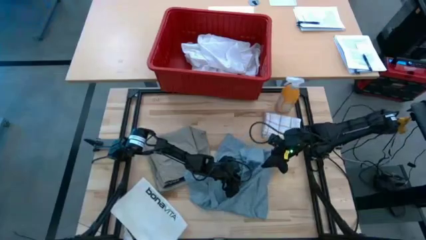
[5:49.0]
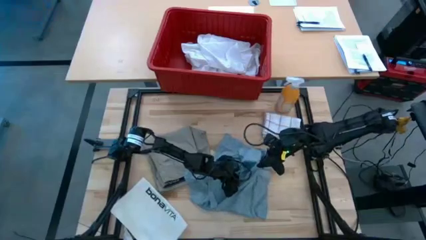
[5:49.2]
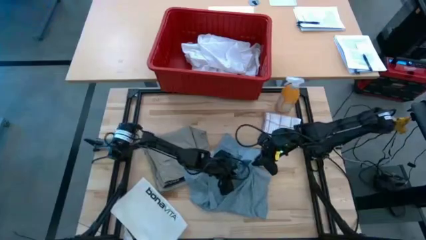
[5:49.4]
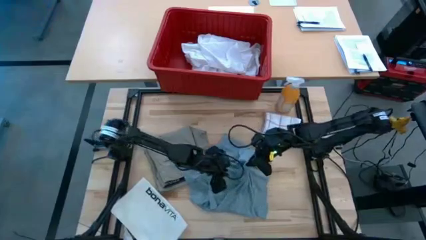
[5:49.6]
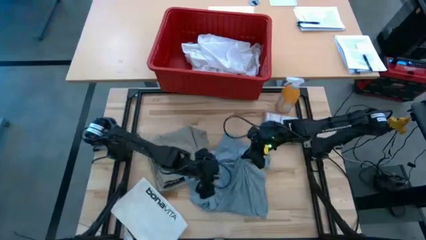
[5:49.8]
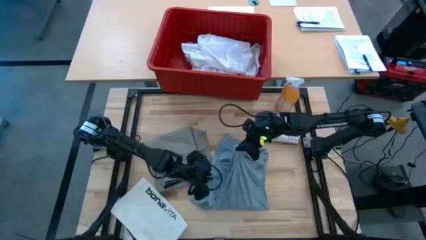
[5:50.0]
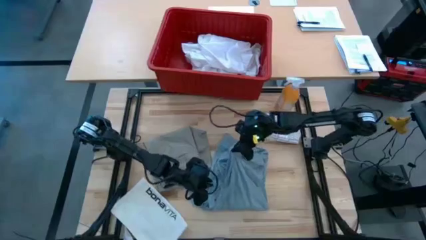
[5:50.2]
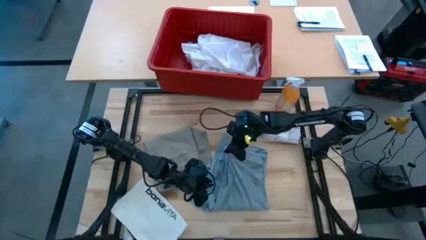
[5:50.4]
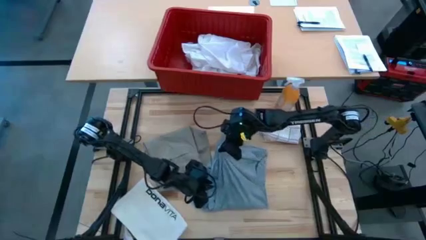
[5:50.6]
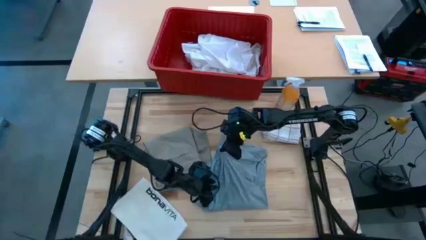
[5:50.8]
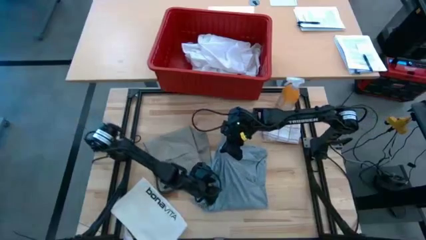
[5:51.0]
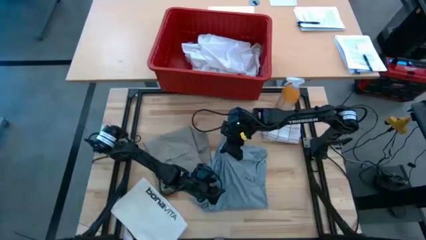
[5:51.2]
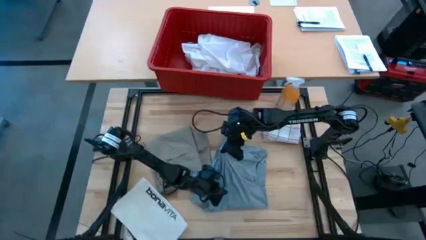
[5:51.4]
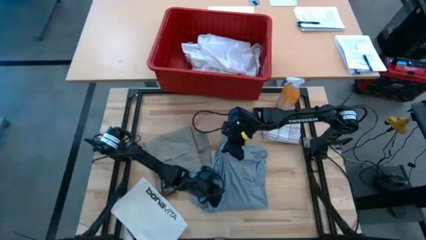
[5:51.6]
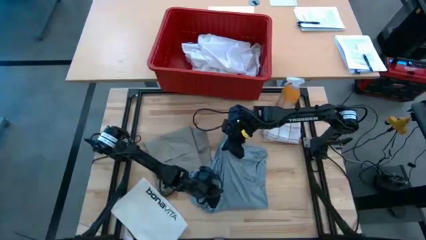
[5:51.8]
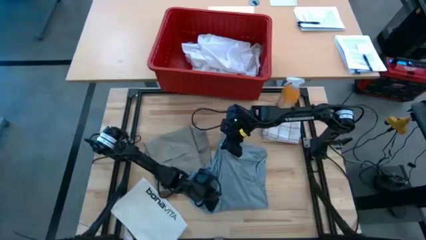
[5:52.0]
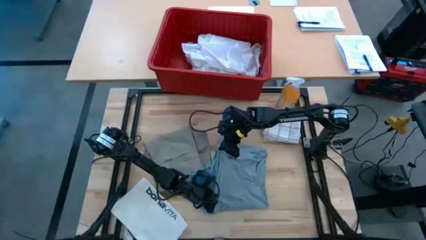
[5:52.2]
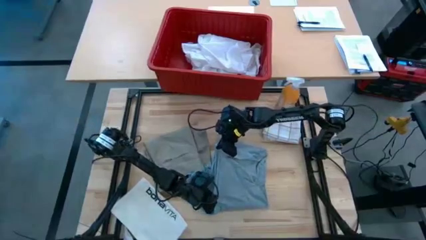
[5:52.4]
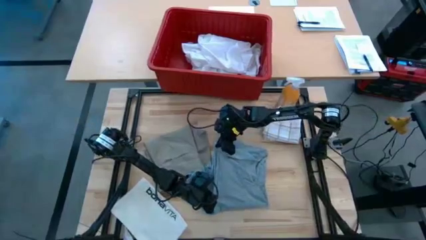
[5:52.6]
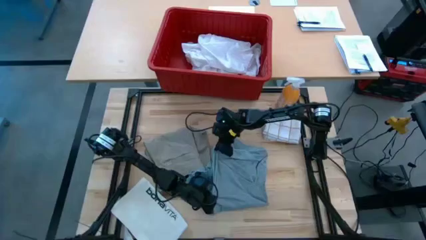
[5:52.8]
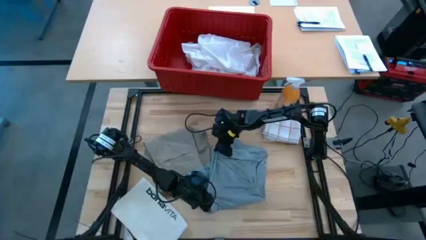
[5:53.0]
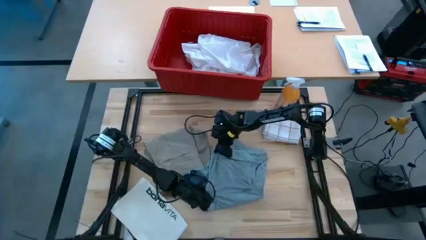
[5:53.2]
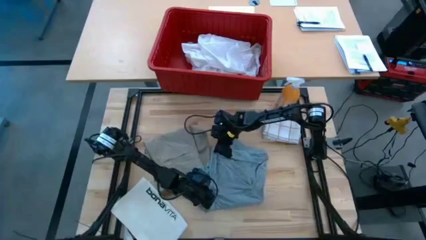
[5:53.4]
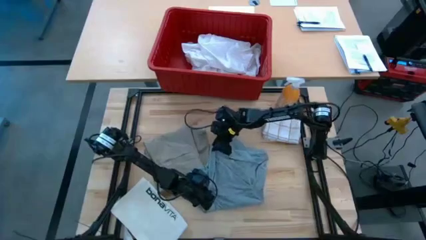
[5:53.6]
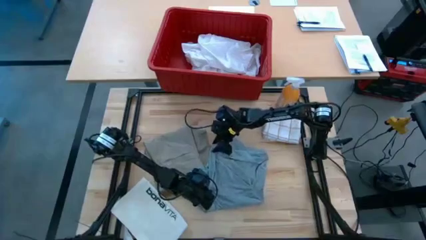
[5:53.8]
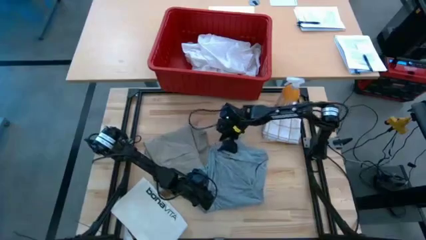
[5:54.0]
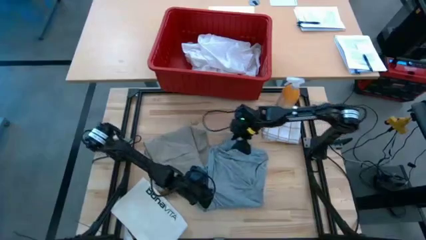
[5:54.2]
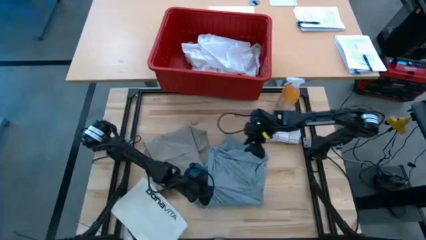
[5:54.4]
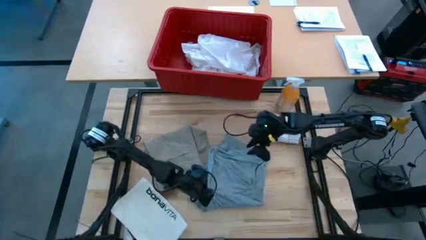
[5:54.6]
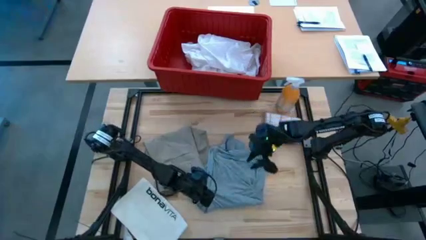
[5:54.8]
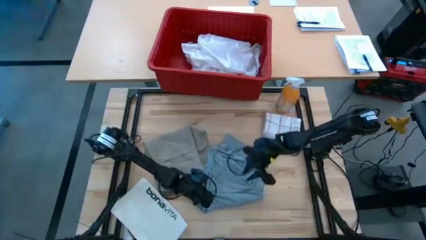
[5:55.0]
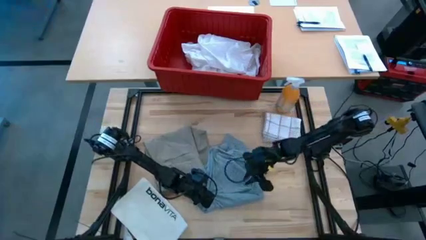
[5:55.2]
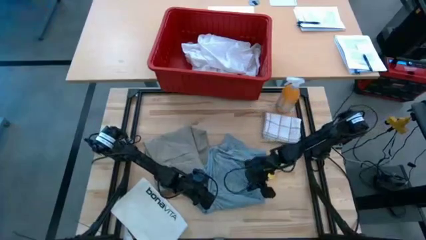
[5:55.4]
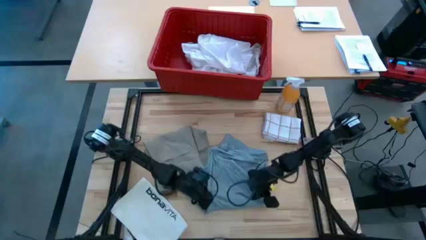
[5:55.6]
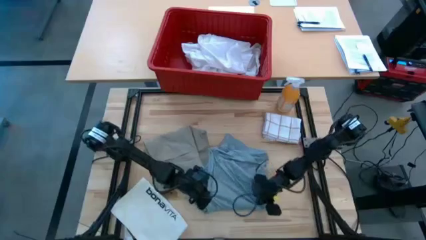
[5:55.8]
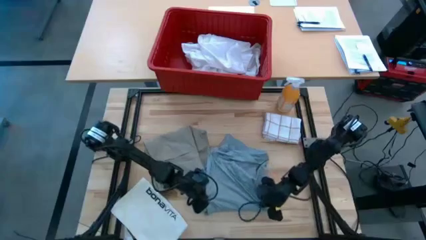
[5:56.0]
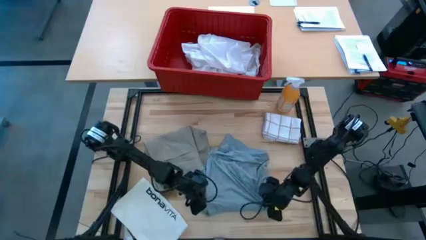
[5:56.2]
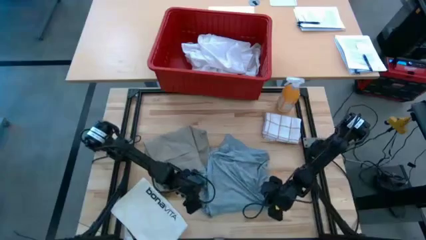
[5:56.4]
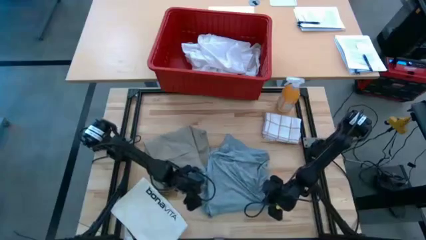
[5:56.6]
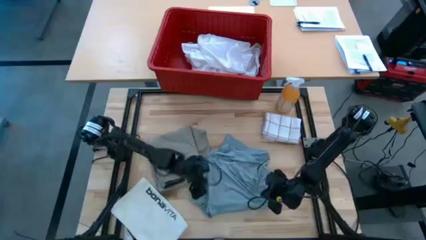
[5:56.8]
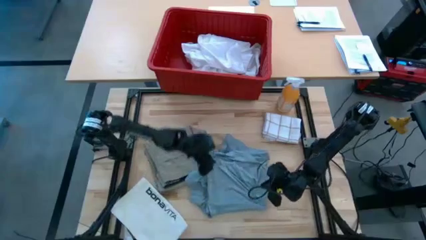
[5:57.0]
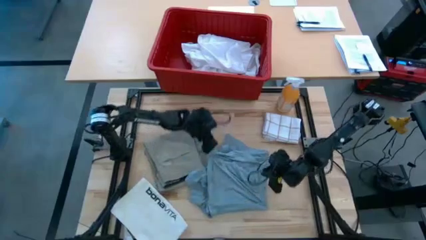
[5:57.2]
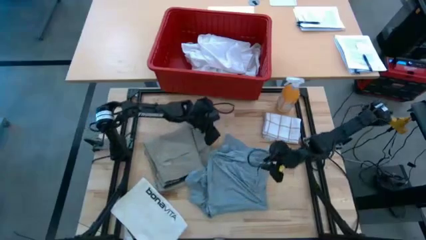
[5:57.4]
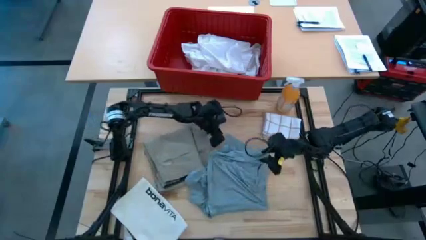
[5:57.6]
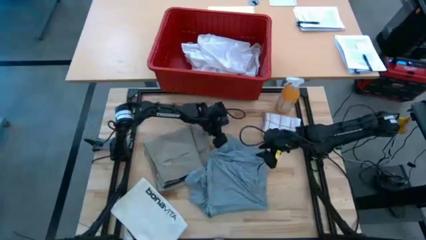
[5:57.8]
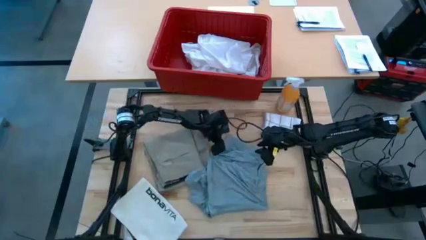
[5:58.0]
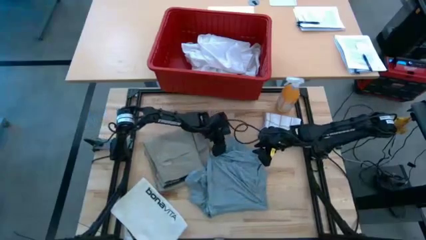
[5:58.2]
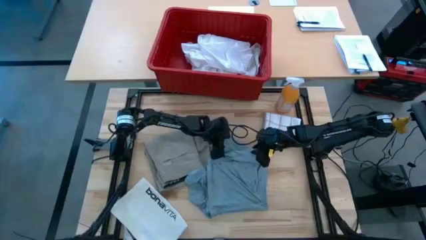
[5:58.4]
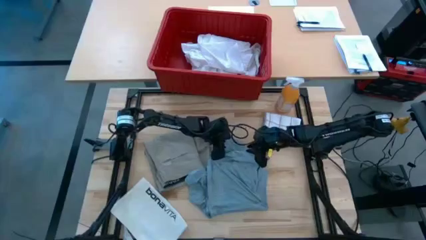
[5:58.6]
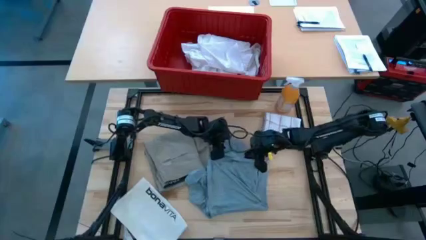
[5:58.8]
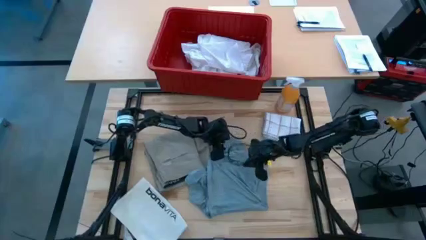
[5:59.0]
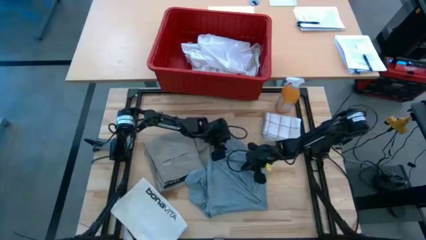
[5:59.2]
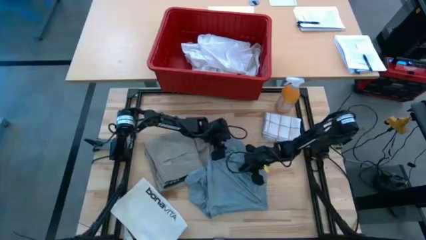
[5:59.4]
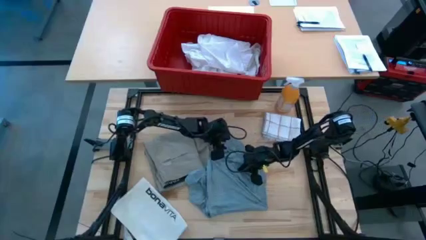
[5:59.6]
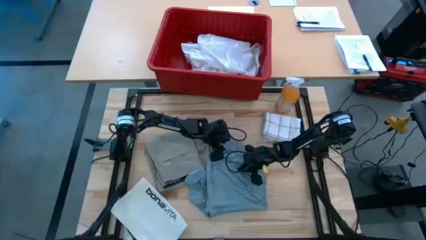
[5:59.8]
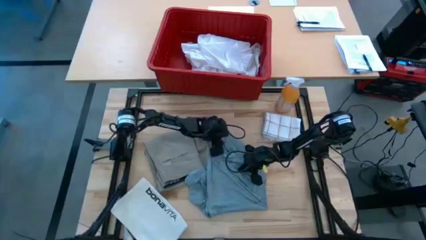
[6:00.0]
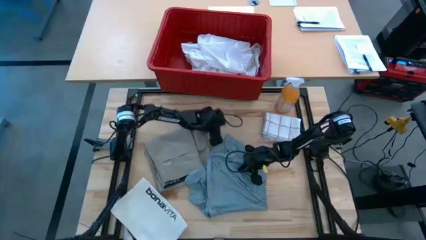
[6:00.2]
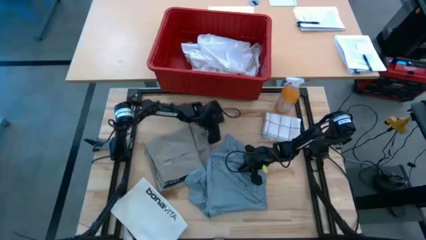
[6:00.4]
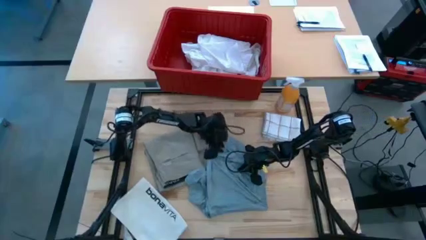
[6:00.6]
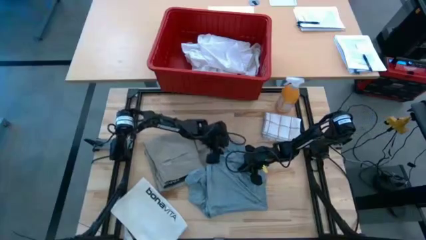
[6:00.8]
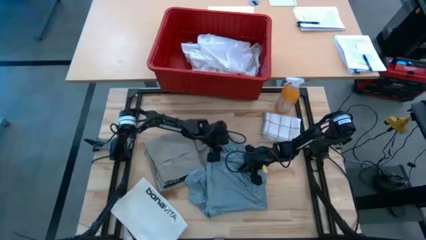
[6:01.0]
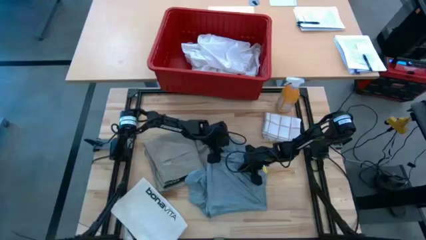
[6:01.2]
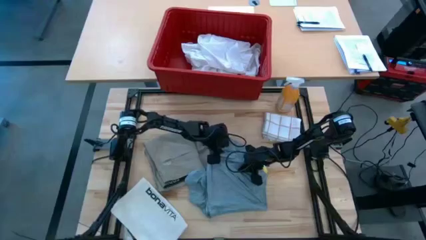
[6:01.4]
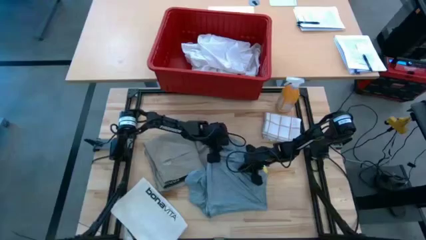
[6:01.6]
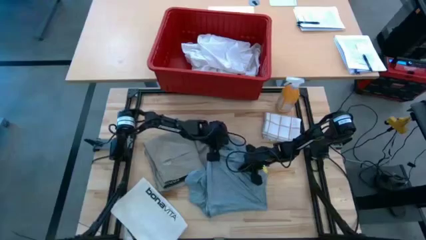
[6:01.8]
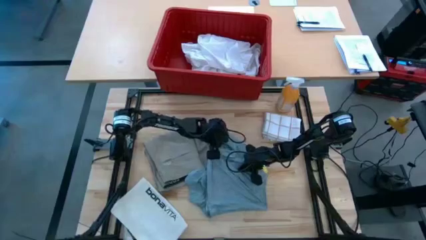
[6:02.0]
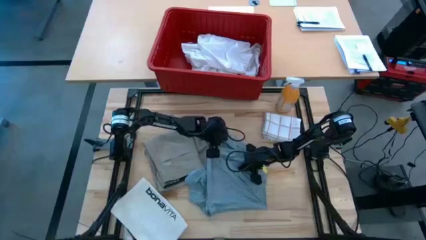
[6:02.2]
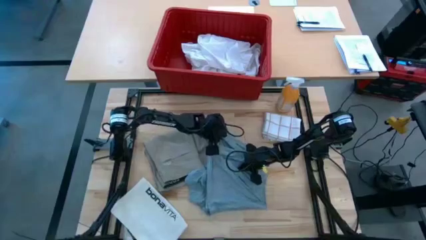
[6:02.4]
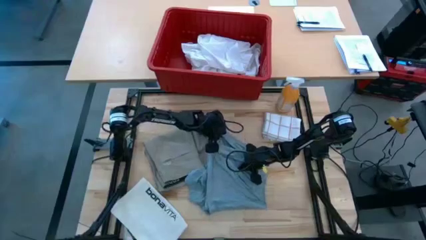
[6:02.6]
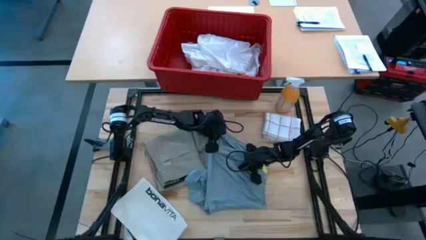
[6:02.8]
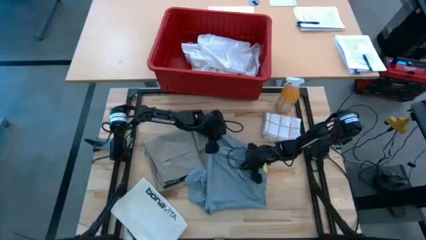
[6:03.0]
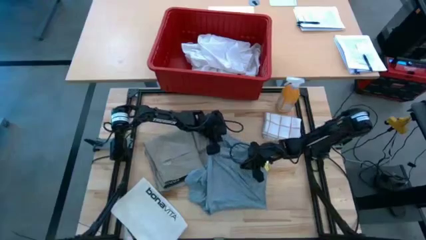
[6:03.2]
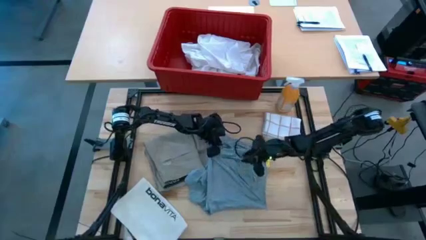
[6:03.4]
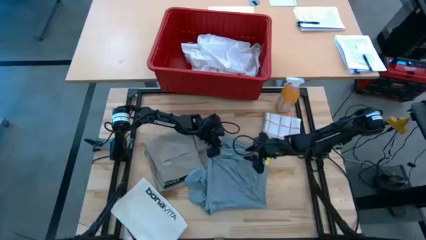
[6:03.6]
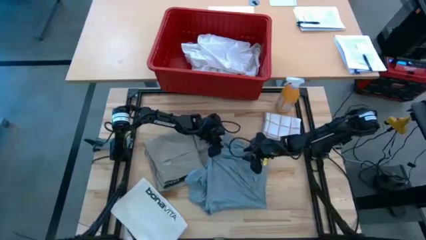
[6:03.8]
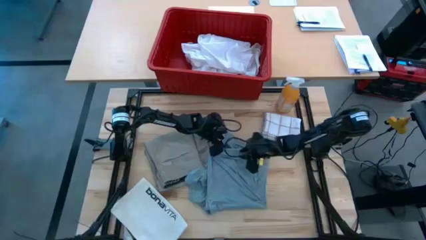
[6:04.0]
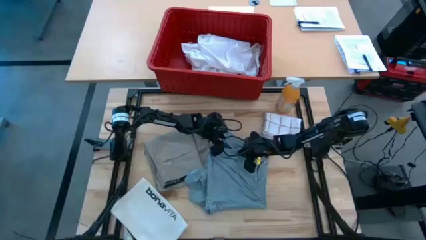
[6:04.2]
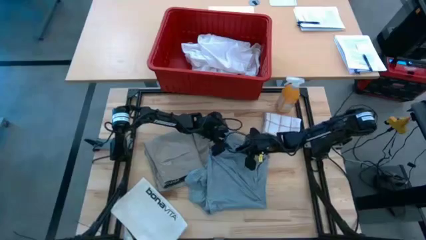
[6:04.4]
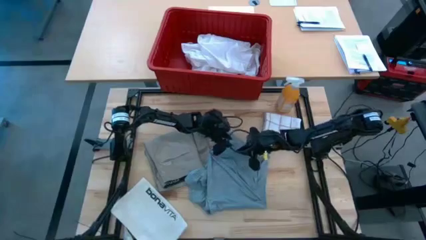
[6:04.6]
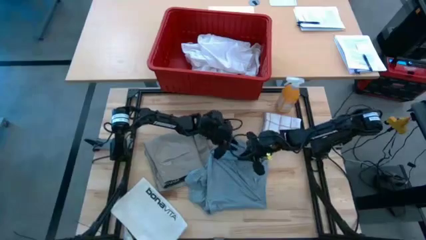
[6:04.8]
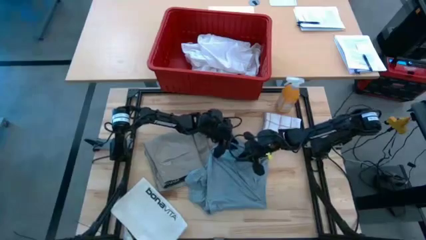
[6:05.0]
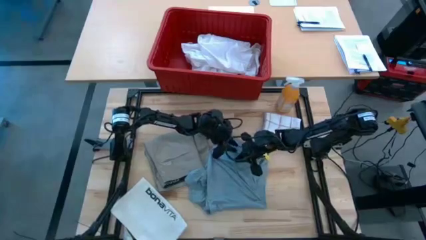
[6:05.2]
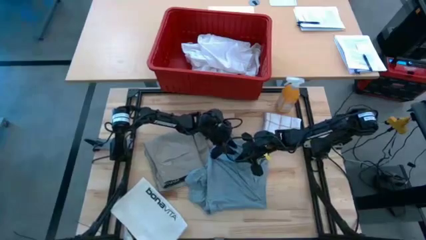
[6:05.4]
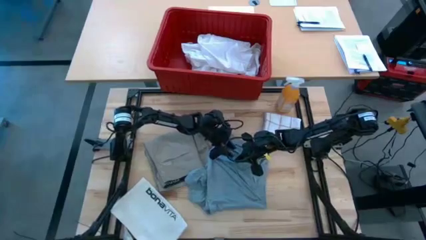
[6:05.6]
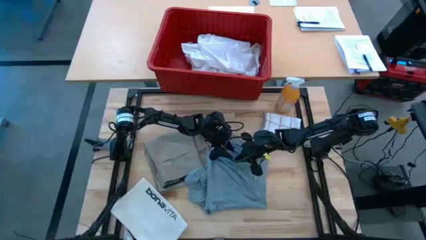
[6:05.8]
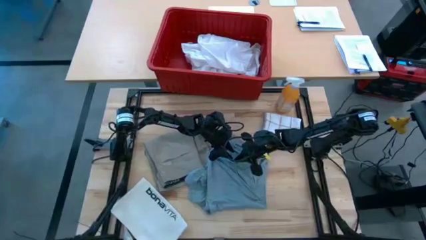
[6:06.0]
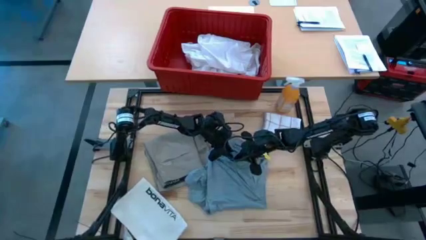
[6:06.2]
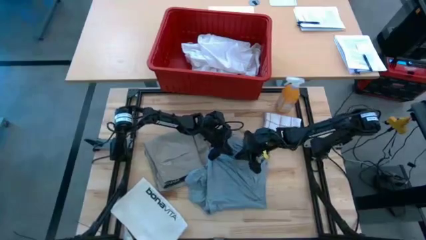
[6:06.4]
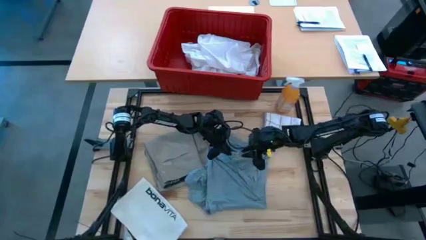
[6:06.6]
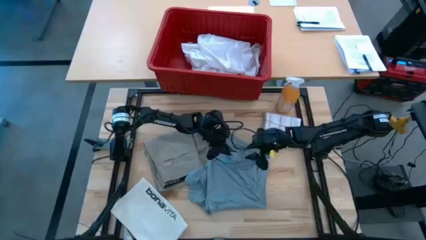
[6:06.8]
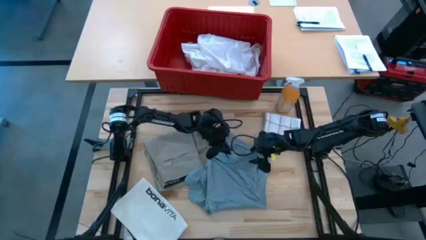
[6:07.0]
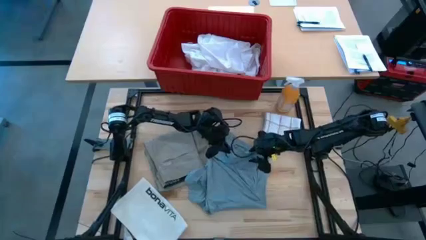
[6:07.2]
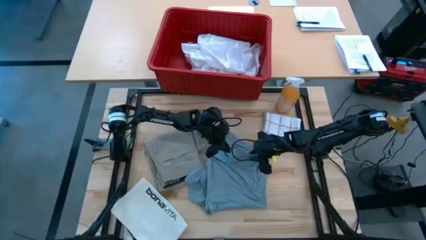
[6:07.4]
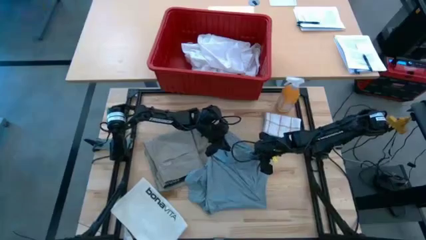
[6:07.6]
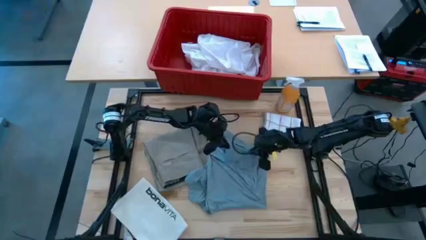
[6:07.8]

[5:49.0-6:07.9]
Task: Fold laundry
Fold the gray shirt
